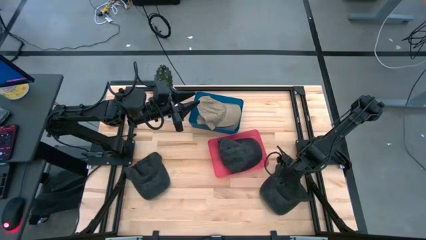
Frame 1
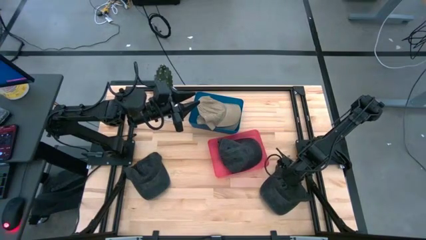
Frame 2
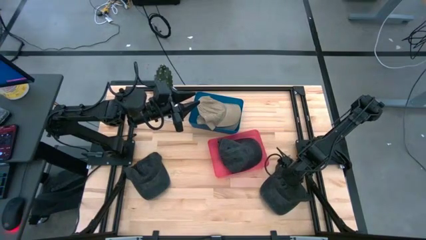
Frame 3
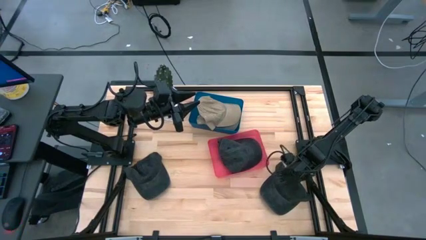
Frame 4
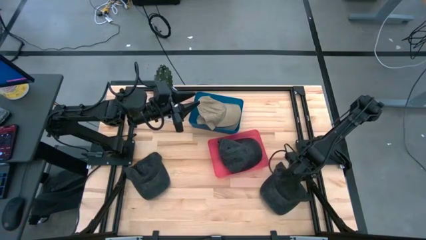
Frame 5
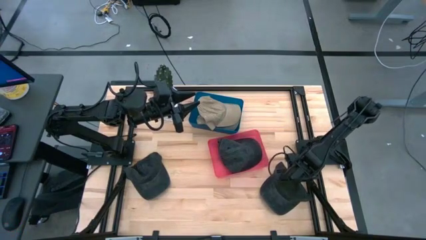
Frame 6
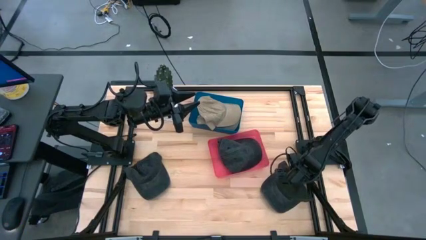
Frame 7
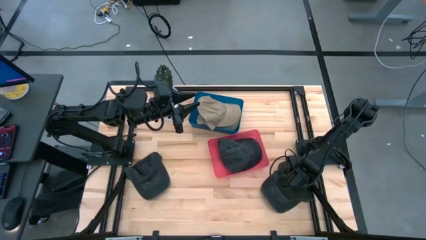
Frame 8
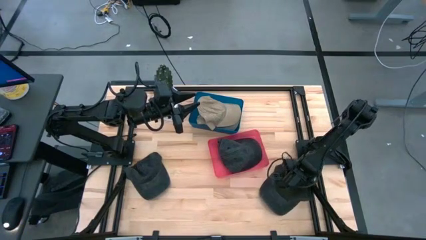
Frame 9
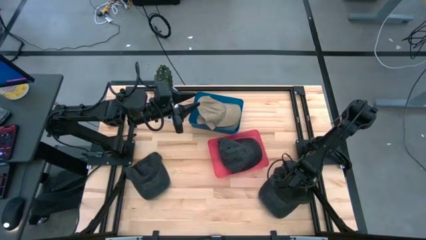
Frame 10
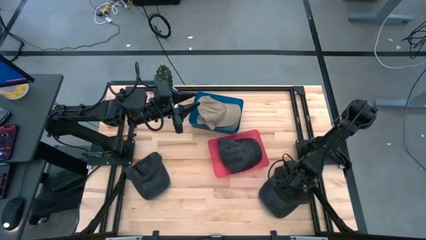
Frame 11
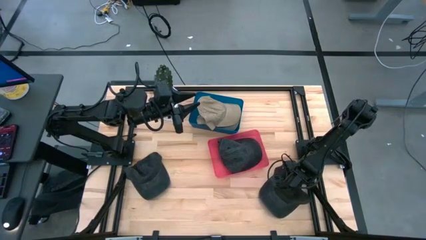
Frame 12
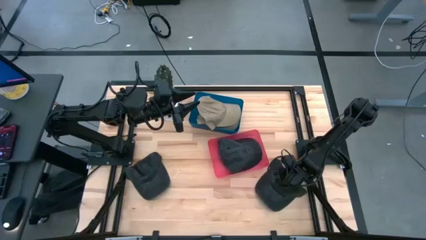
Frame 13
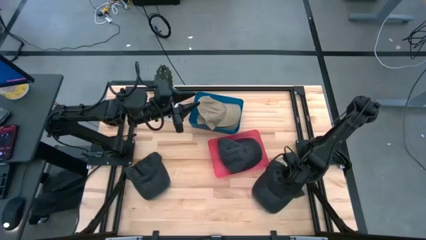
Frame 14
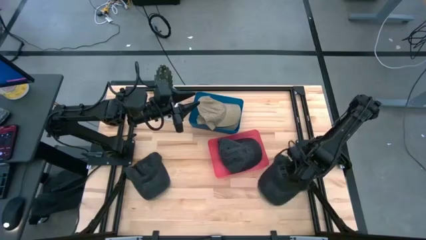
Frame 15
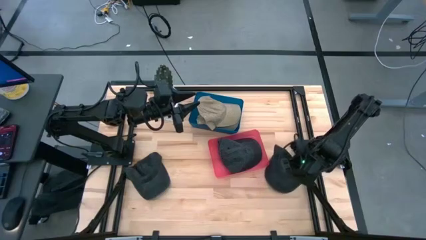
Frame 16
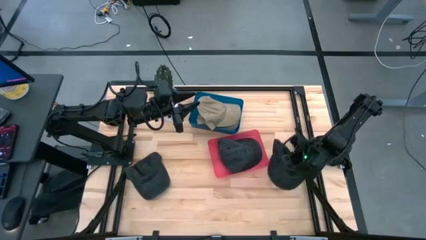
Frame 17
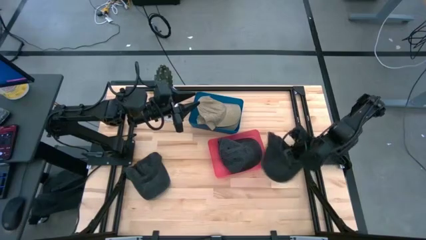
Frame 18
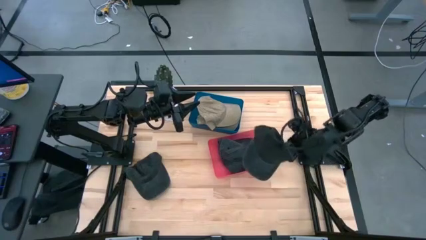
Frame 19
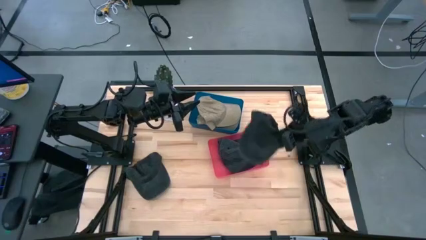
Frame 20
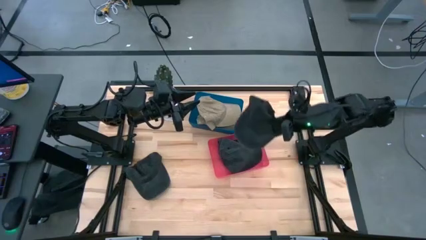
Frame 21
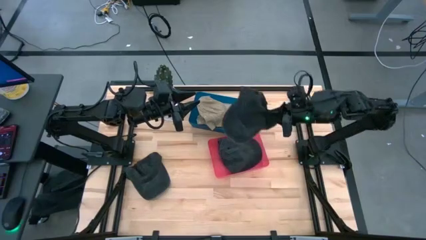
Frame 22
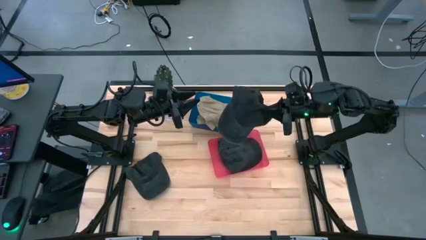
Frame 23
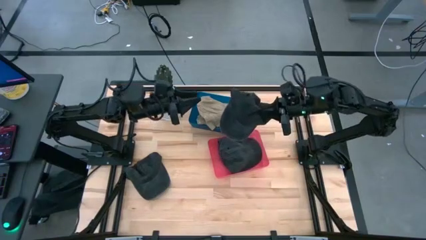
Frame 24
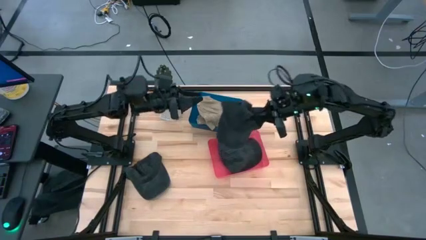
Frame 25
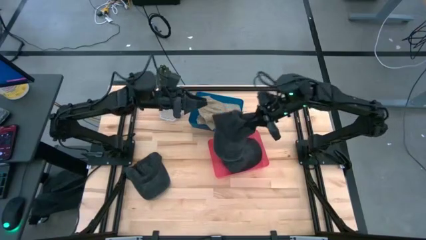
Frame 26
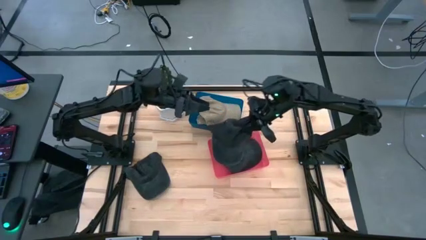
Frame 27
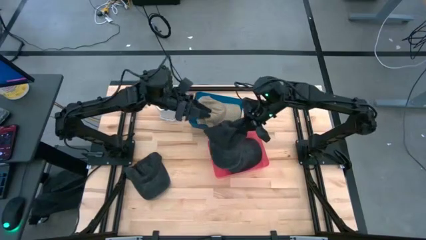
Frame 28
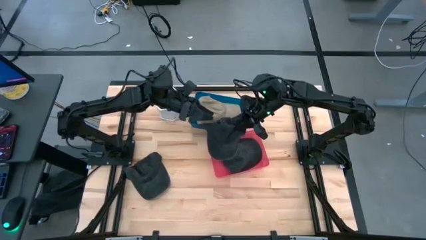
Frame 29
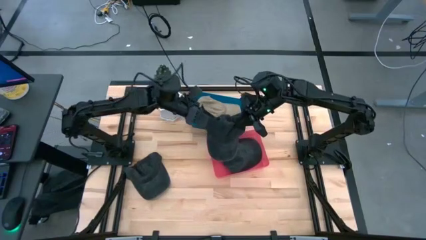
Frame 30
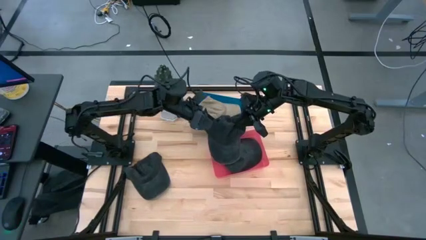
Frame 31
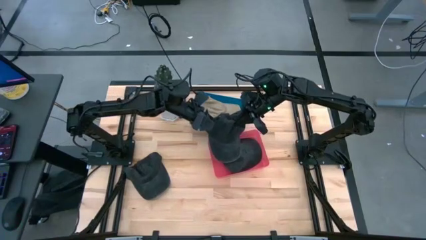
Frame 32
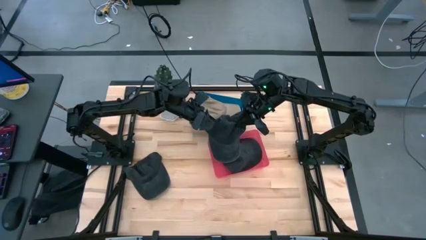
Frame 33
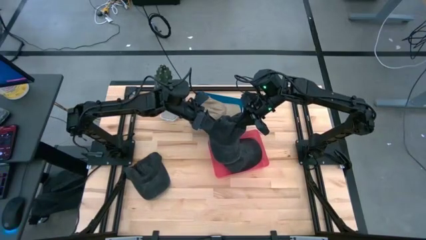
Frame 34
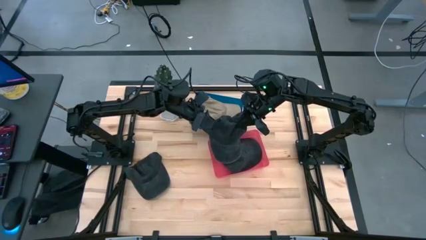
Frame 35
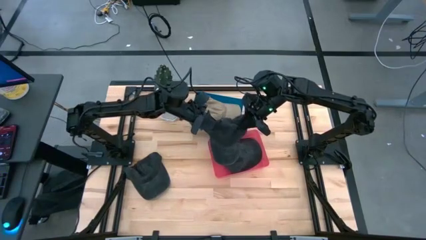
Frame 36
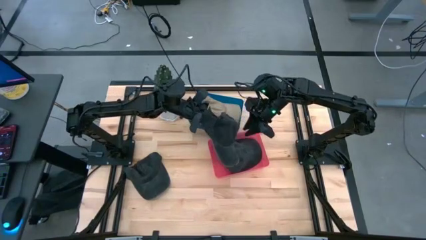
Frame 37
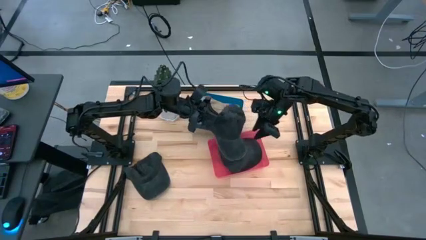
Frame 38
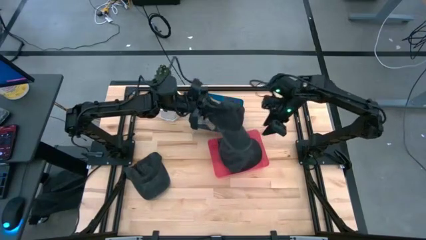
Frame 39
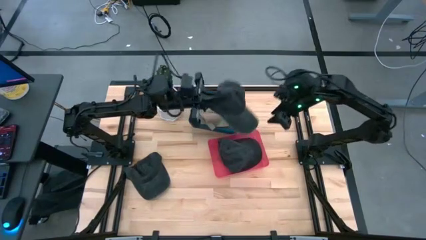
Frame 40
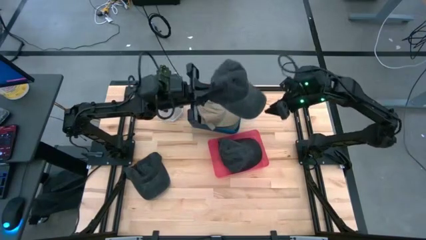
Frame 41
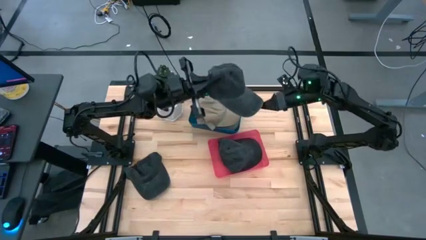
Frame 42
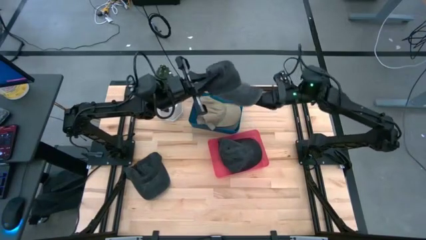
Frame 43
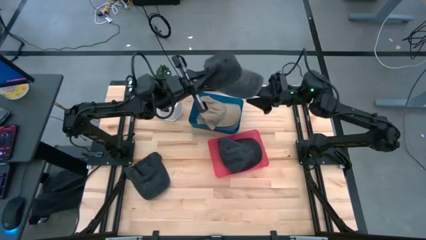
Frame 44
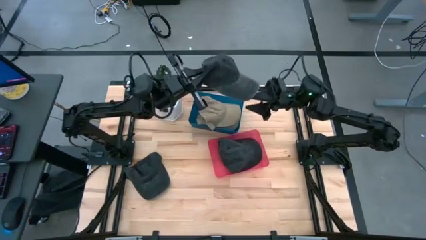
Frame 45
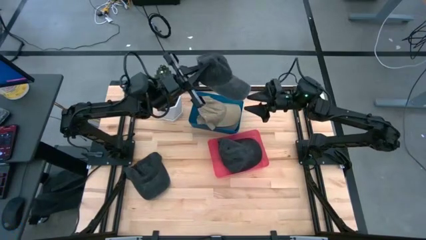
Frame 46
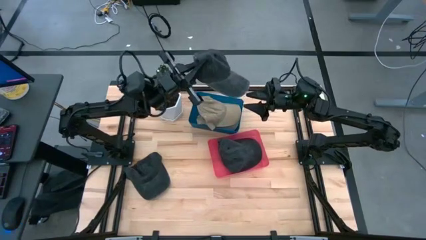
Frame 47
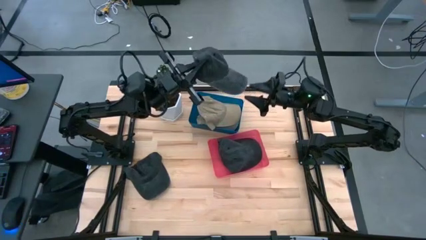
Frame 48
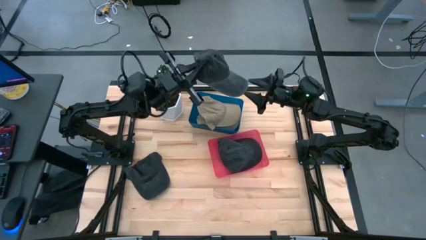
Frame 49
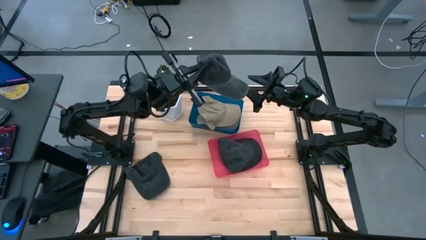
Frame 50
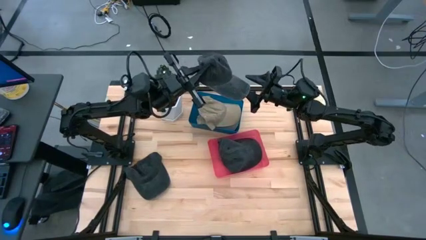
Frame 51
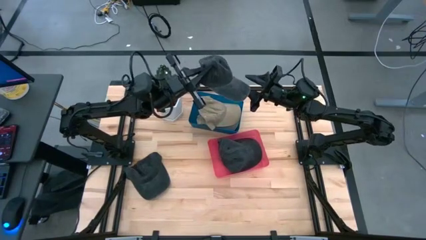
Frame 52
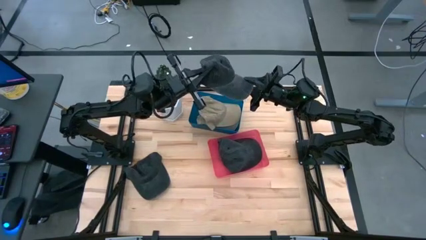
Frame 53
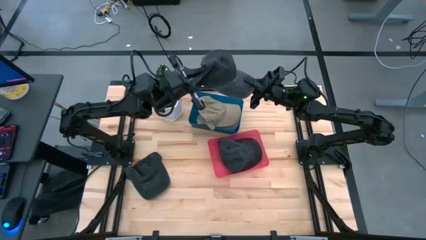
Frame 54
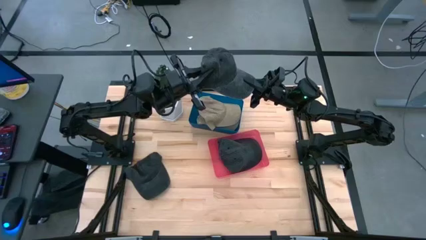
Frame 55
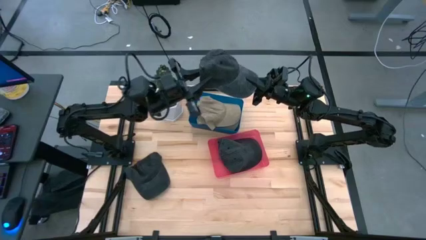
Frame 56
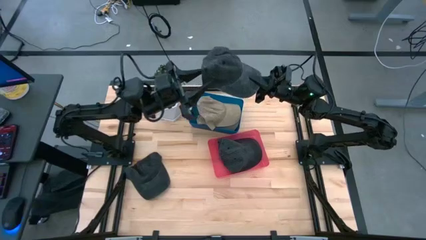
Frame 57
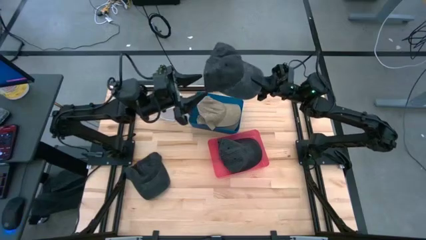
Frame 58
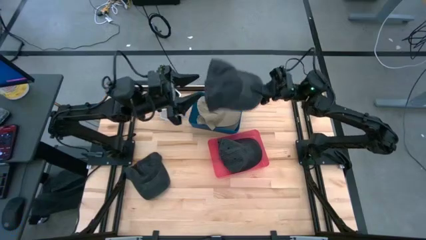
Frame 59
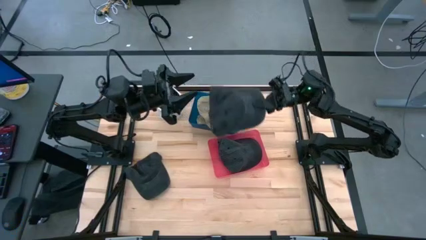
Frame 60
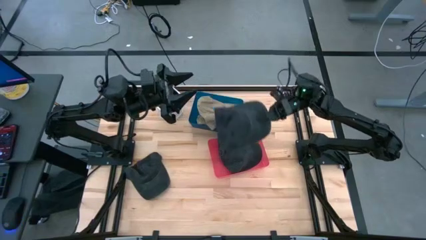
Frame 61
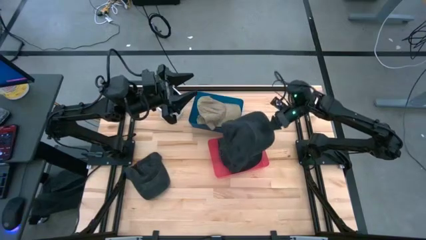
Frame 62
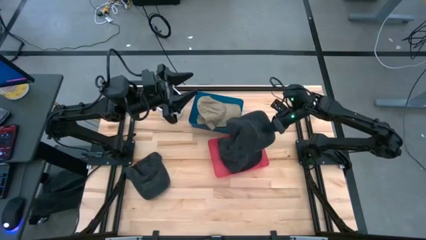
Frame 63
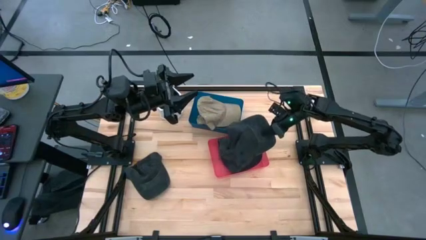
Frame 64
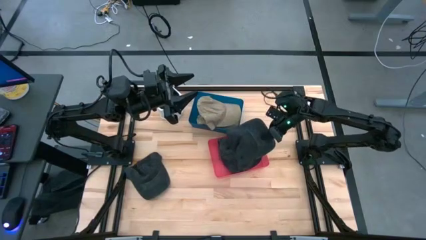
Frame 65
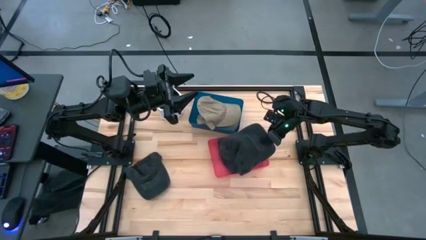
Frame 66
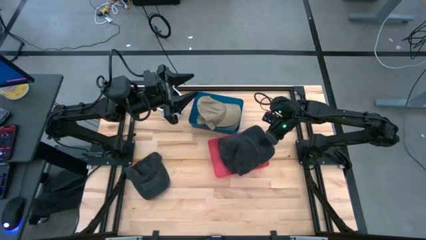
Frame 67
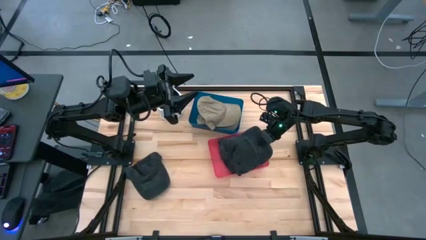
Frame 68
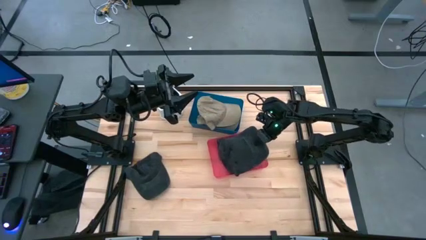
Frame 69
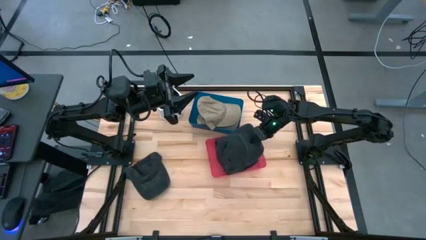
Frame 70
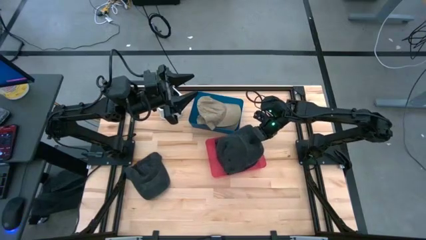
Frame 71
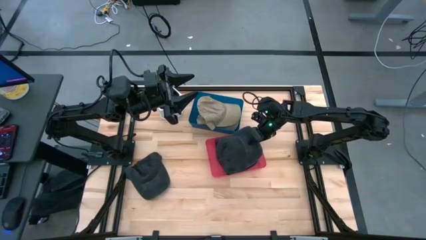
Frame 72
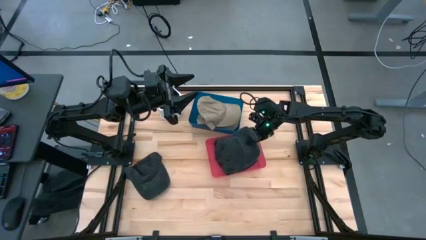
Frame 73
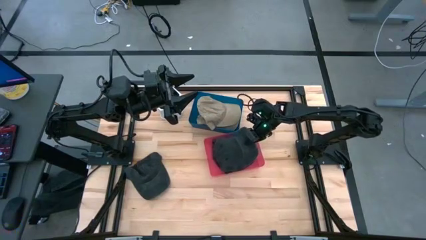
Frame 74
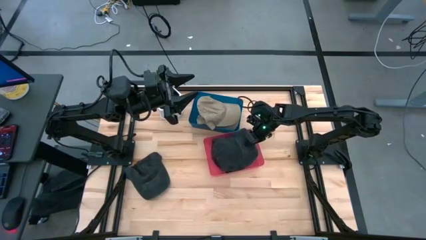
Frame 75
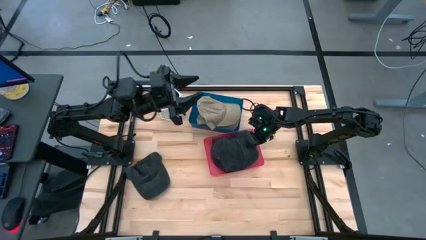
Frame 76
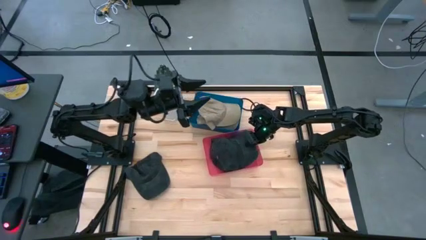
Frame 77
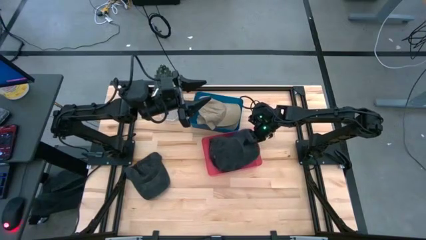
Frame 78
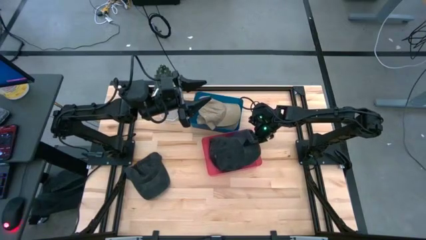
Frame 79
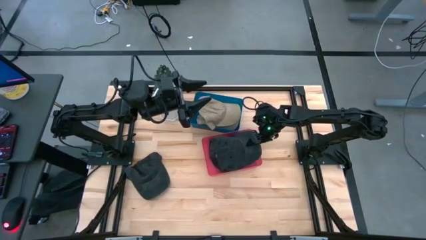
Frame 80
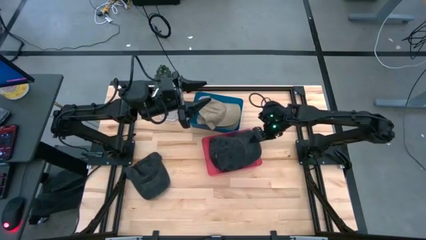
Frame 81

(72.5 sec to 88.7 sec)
Task: Pick & Place hat
Put the right black cap into the red bin
